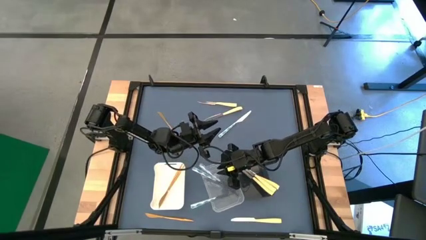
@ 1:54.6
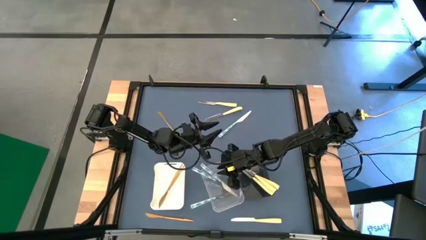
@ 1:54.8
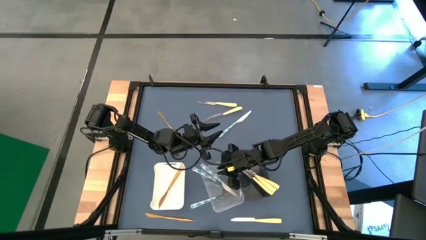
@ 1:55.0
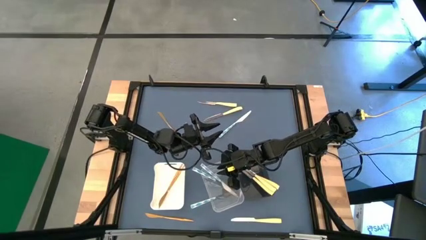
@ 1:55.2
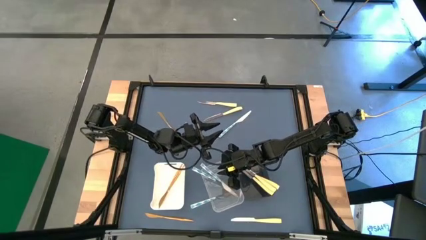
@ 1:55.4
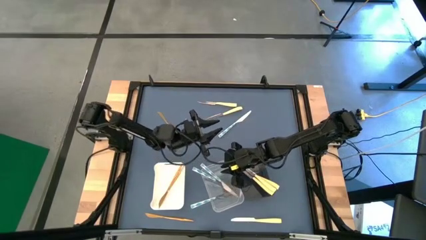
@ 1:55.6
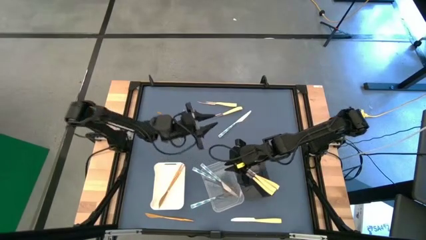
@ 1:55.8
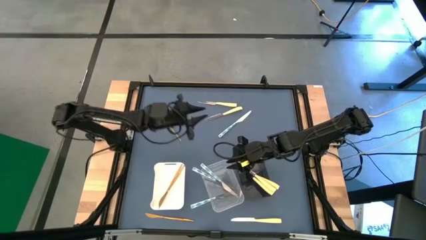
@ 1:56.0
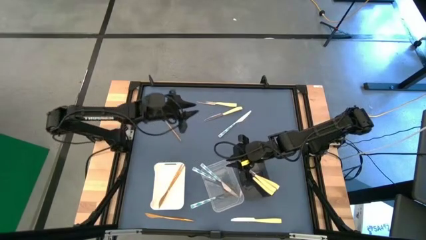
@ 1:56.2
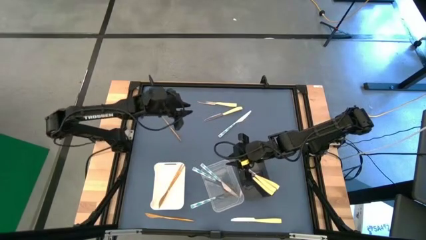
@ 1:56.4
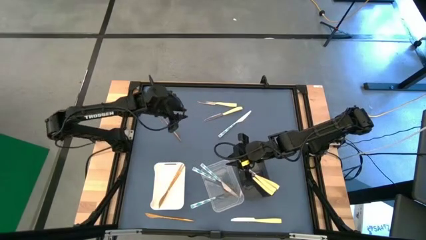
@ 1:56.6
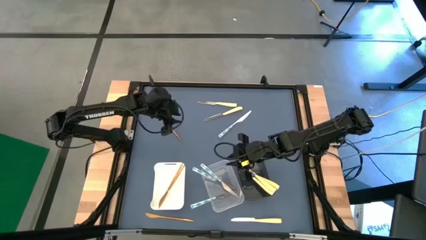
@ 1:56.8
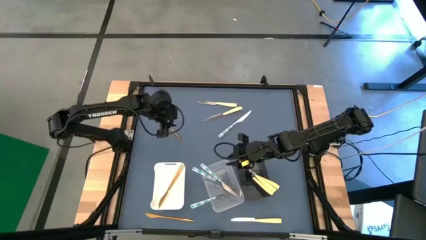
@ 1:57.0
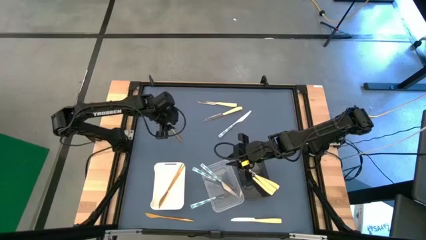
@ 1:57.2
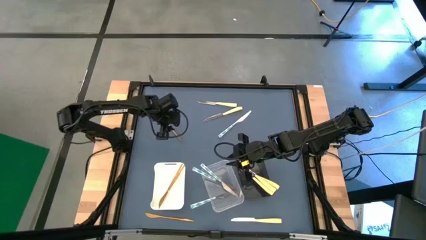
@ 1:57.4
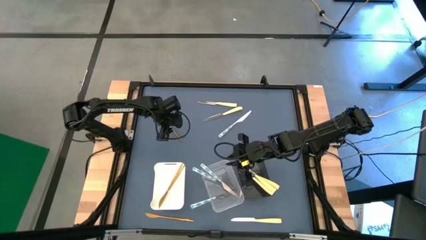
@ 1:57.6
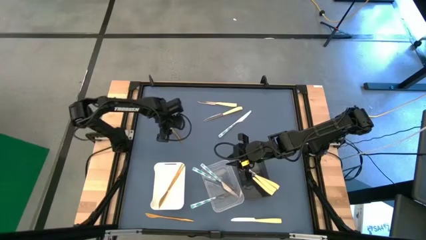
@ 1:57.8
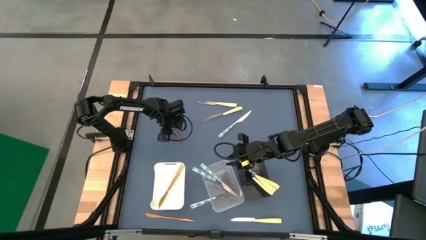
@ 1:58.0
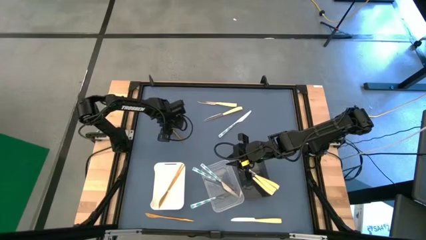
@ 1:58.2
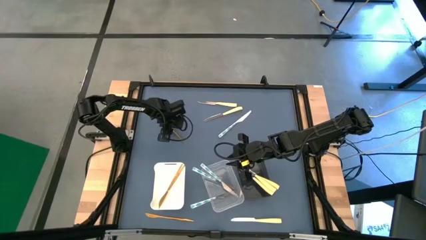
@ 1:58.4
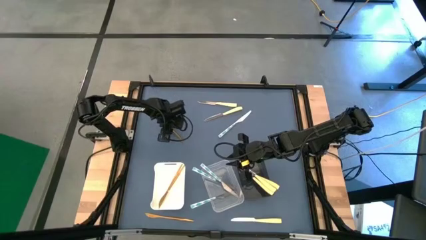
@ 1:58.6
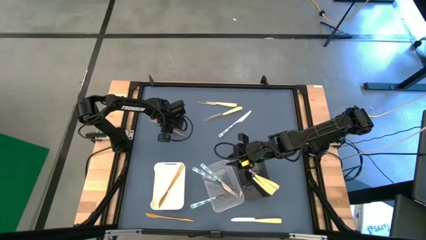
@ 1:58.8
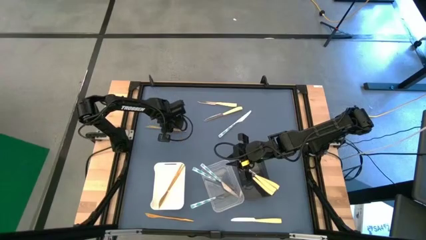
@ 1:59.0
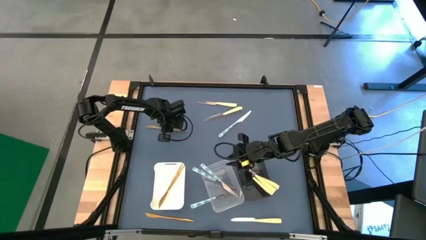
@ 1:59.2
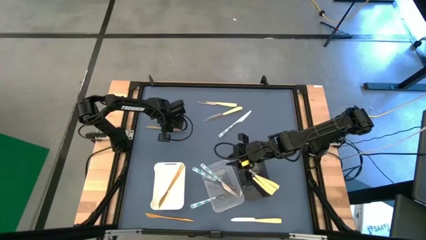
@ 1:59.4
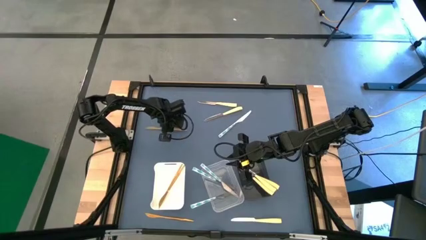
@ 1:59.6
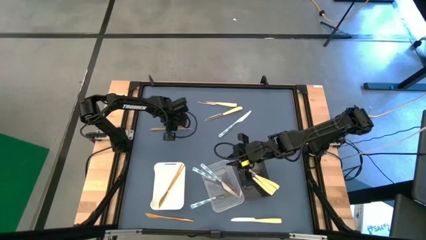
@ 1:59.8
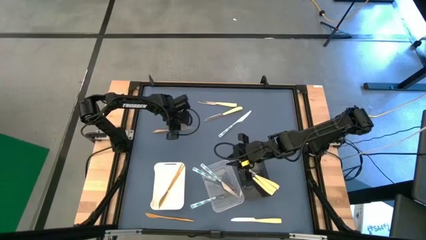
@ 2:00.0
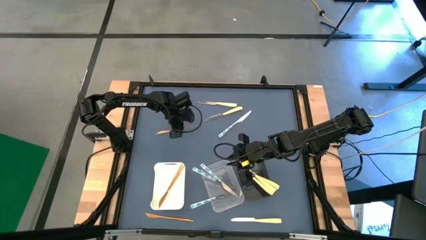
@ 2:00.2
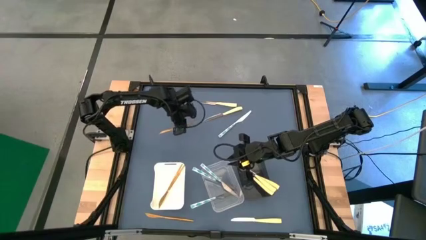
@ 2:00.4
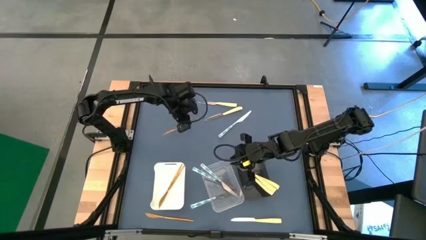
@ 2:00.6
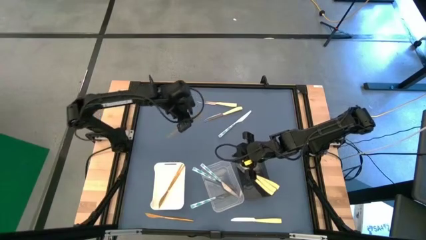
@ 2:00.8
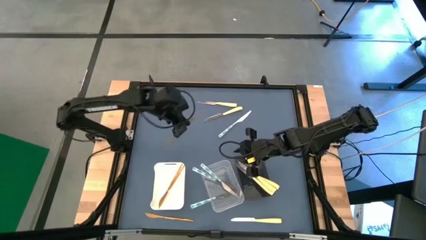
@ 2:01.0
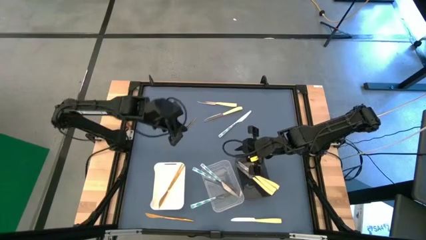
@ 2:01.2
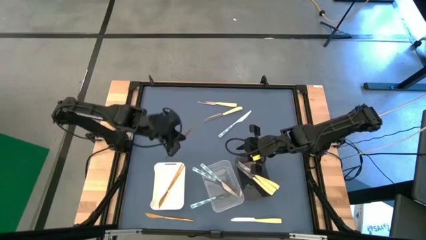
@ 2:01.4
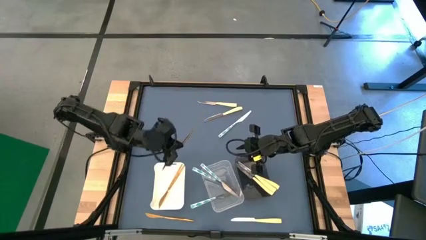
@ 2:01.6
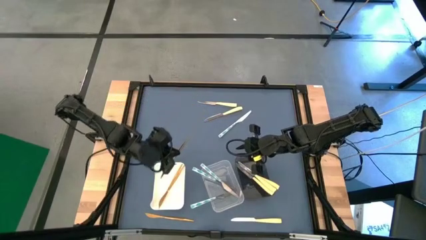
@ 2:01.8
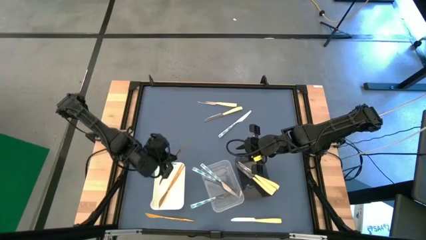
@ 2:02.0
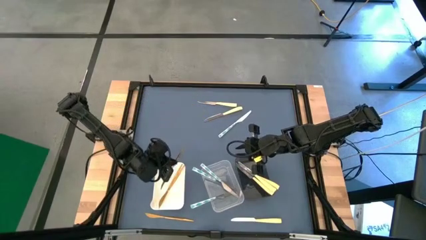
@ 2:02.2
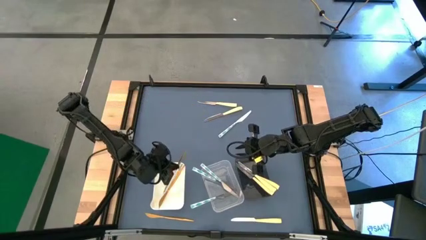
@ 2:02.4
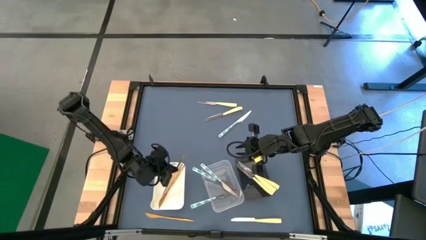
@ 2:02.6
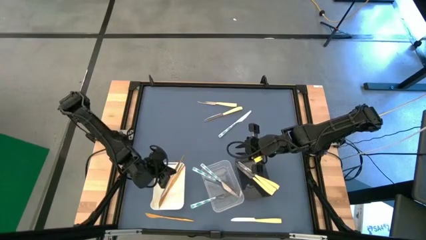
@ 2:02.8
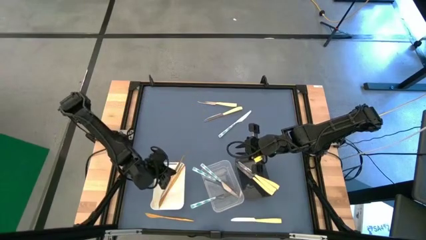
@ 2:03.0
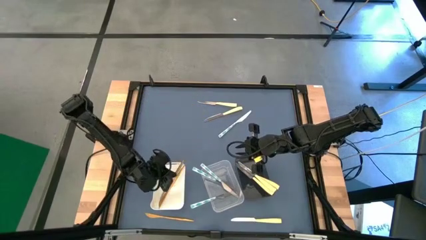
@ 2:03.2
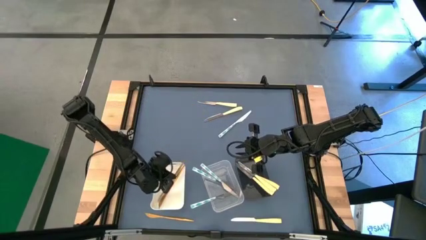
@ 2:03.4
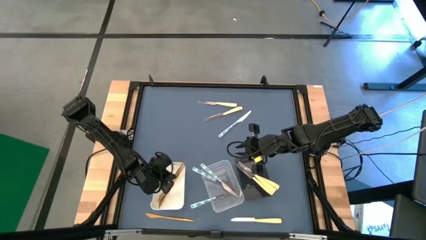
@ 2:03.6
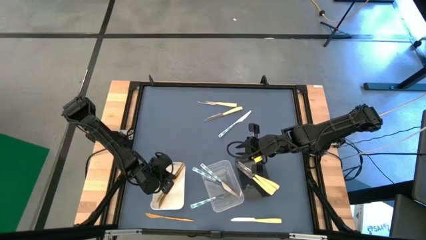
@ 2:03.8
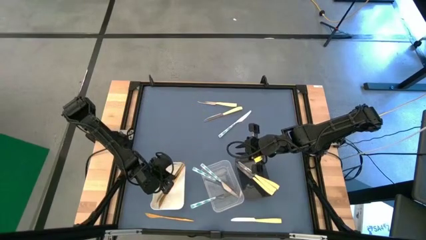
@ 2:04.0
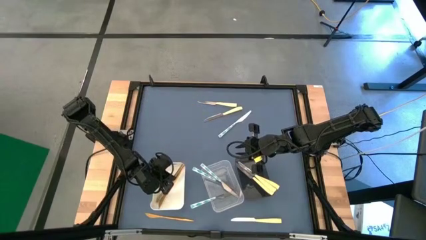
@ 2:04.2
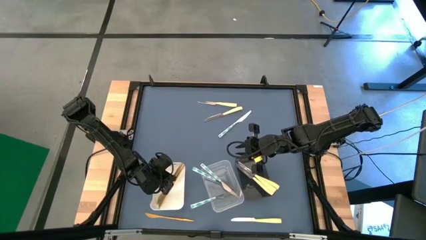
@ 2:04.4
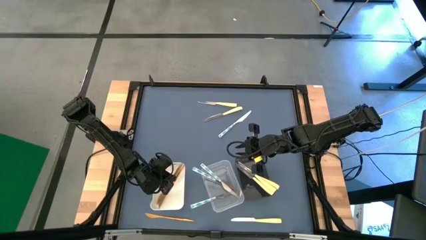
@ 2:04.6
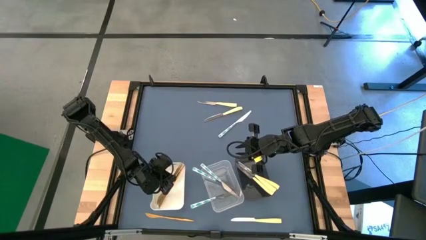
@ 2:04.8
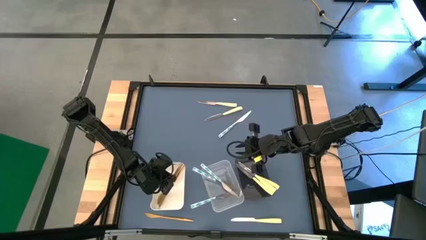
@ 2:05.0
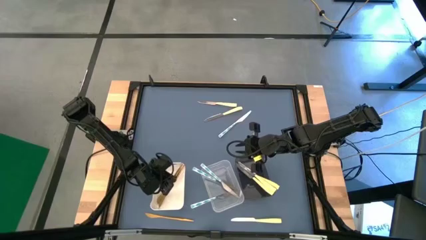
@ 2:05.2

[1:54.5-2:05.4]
Task: Sort silverware by color (type)
Put the gold table knife into the white bin

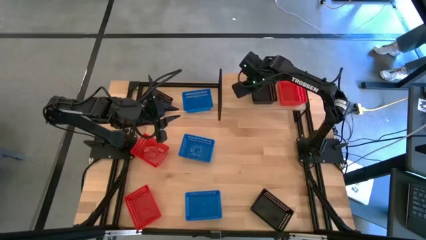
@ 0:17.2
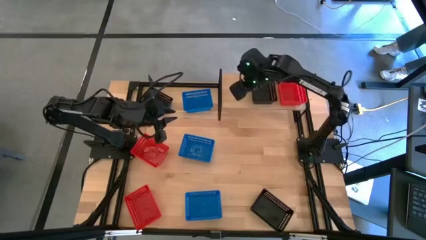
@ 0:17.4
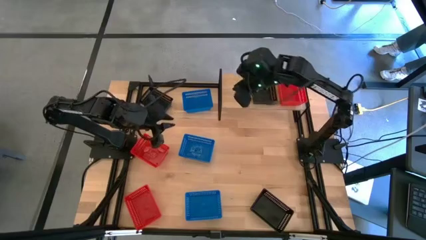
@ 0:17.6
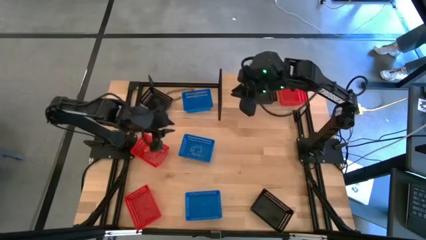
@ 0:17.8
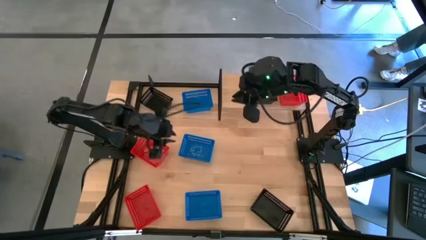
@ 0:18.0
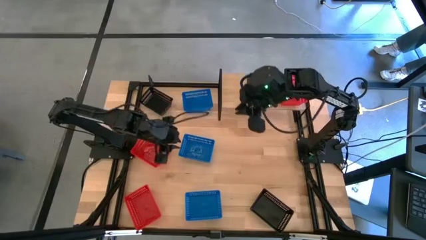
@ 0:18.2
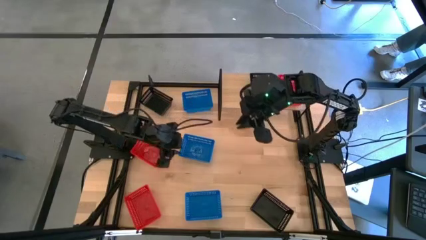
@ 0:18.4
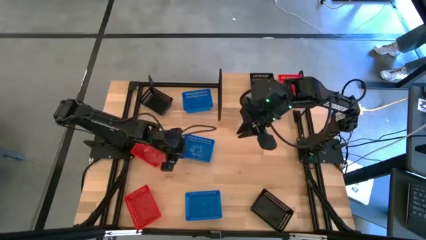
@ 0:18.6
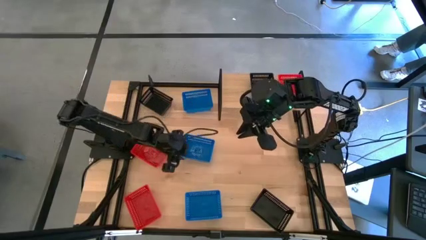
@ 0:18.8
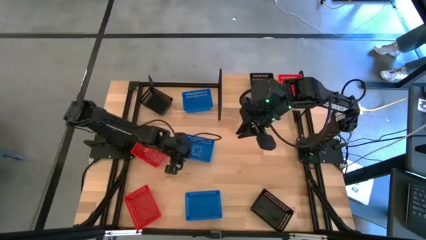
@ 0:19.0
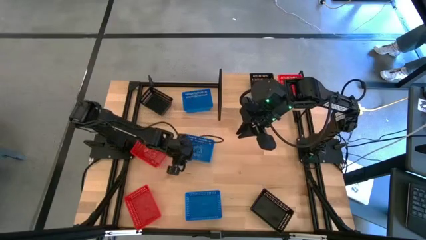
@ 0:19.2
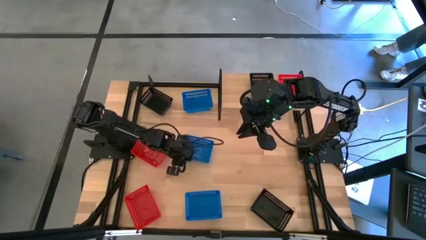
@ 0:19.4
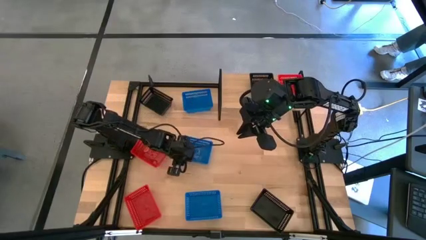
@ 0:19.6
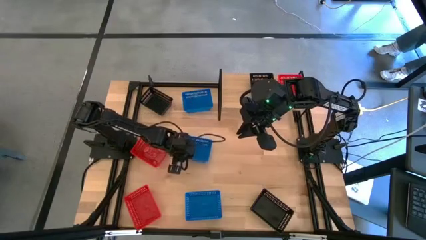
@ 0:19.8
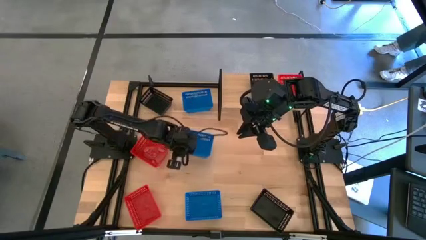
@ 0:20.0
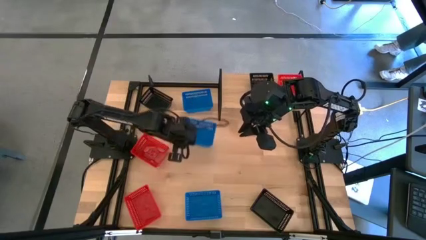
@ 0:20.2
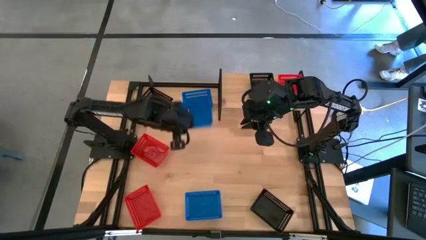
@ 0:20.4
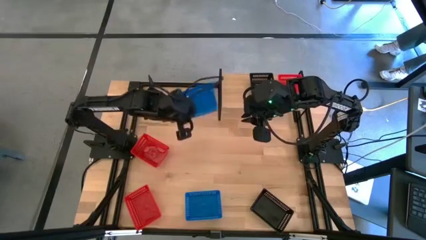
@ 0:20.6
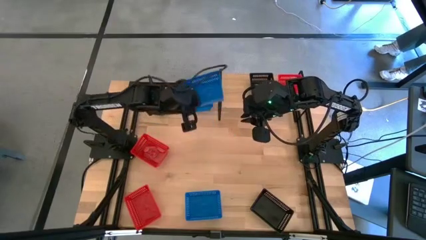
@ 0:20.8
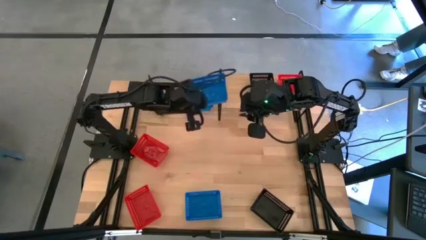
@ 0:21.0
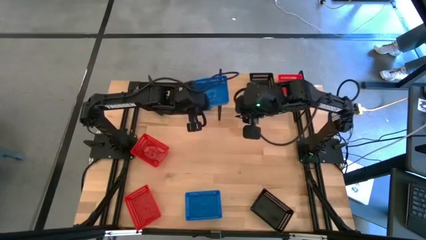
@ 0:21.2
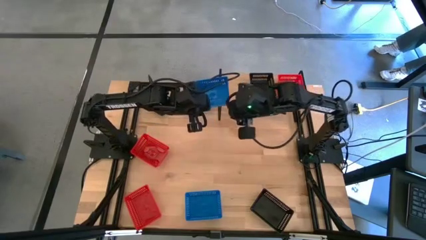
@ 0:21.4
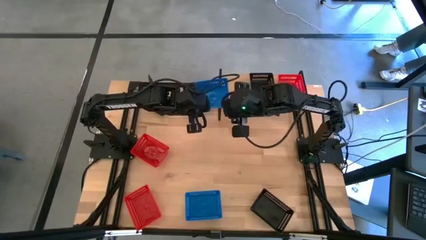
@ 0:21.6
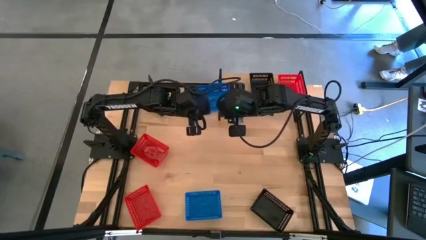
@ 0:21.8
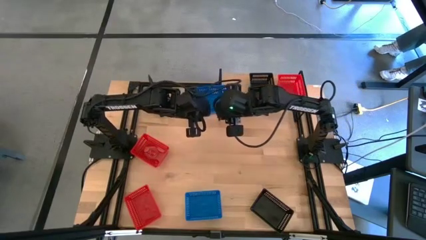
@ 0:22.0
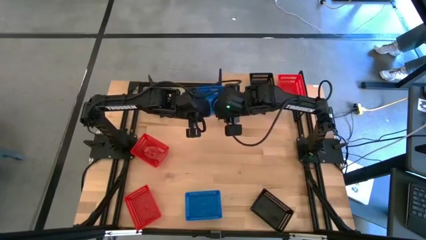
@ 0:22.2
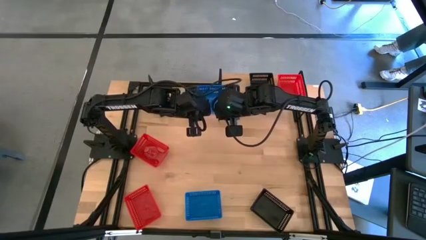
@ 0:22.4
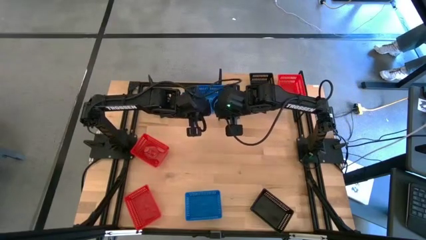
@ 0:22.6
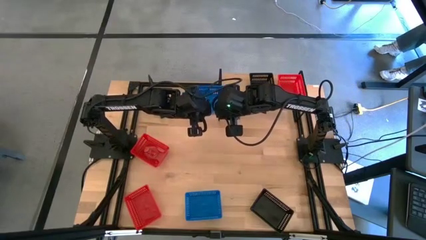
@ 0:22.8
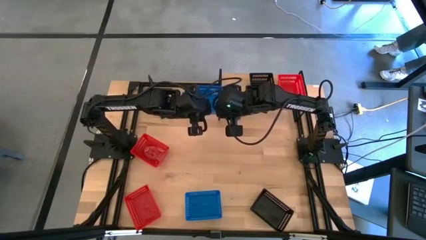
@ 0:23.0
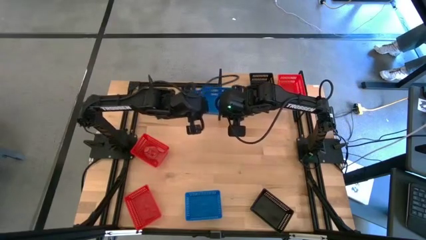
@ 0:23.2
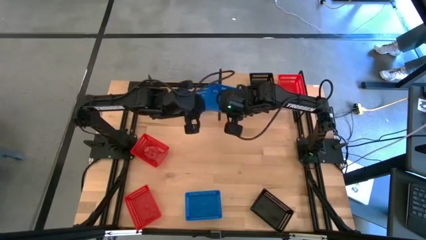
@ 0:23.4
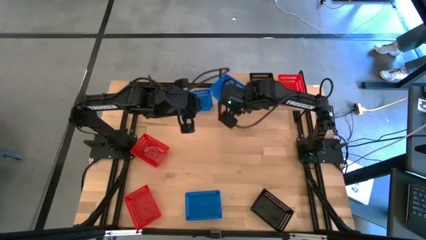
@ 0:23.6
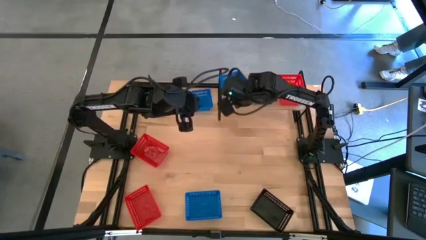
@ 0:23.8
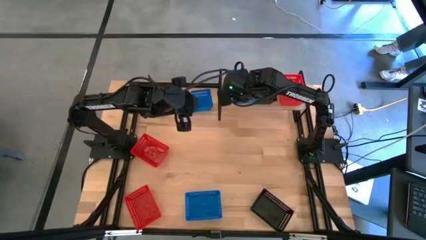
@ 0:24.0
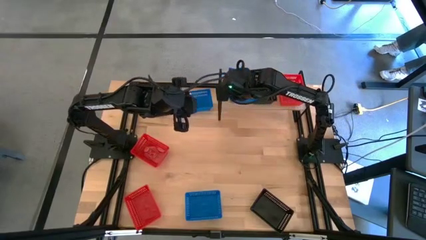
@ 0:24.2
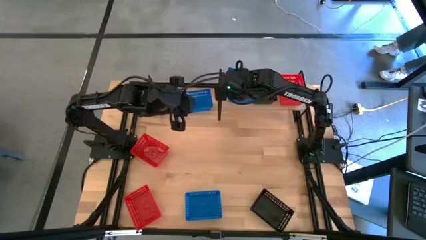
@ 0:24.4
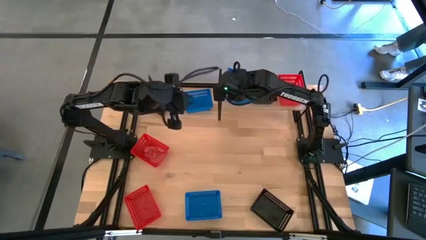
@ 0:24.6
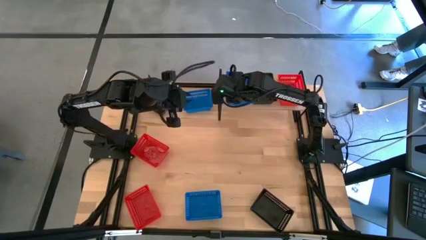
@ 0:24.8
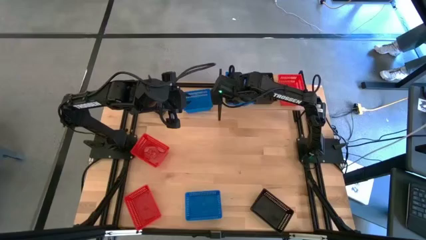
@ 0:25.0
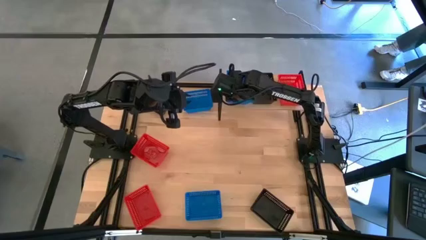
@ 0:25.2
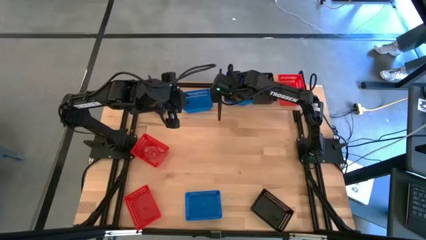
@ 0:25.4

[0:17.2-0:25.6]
Task: Stack baskets on shelf by color
Put the center blue bin on the shelf
